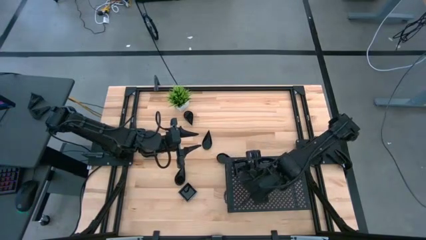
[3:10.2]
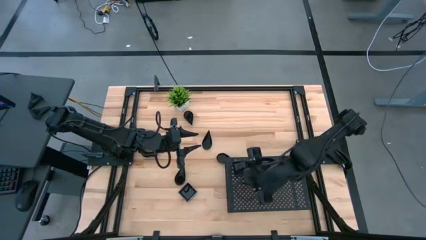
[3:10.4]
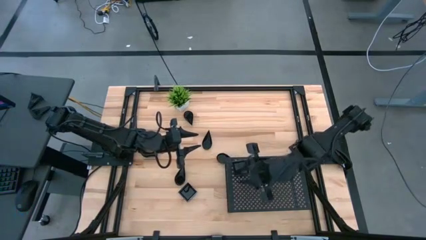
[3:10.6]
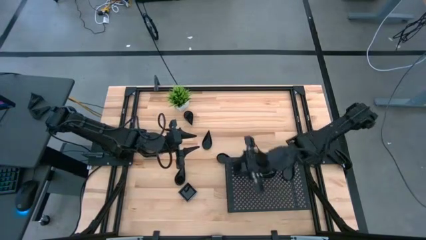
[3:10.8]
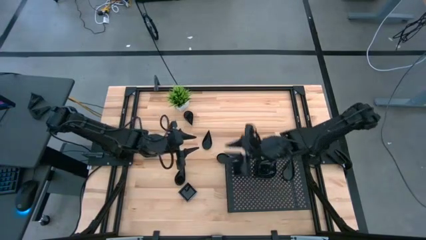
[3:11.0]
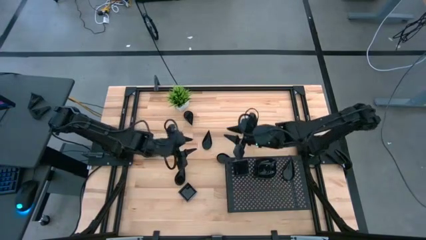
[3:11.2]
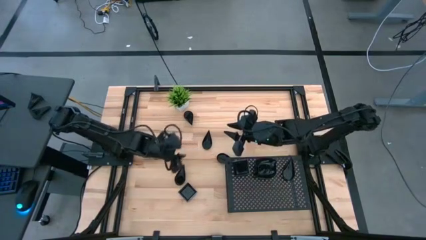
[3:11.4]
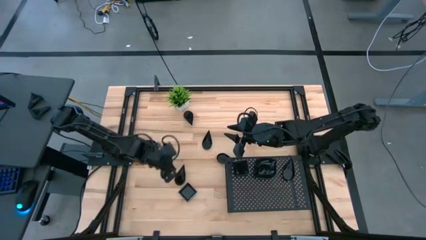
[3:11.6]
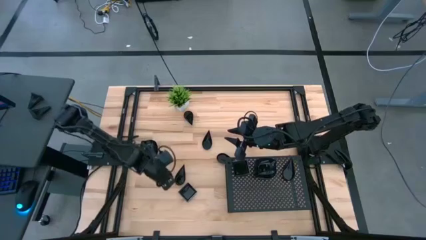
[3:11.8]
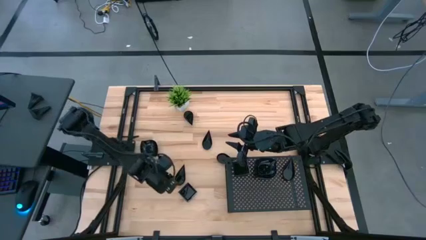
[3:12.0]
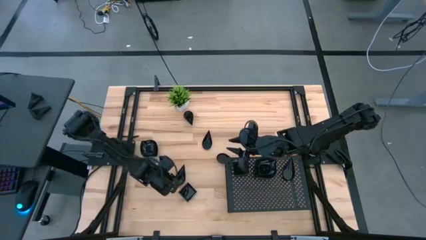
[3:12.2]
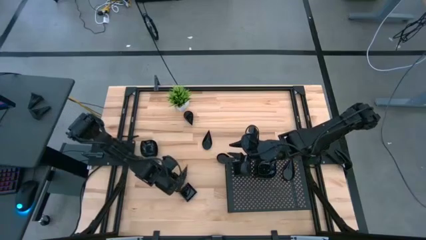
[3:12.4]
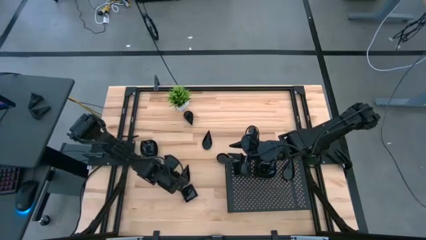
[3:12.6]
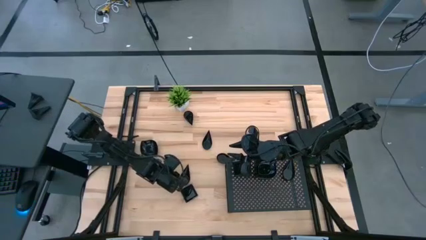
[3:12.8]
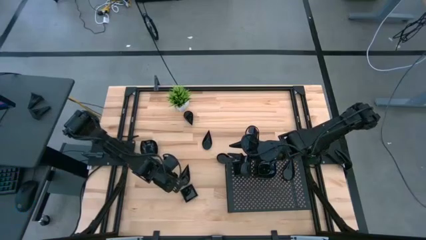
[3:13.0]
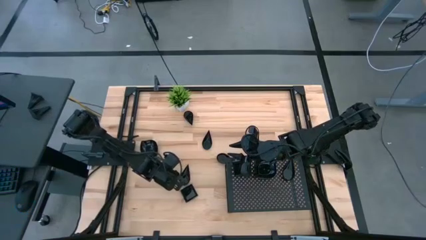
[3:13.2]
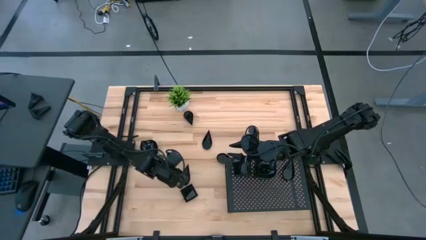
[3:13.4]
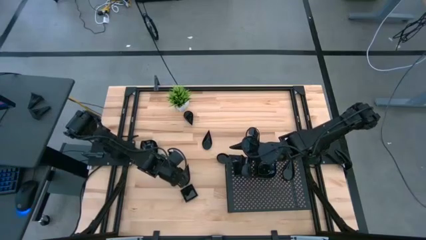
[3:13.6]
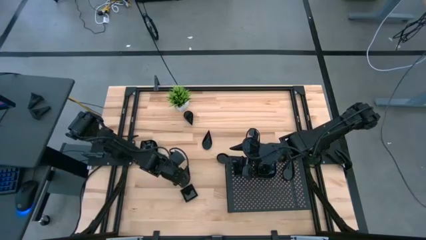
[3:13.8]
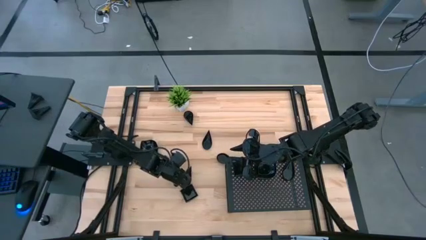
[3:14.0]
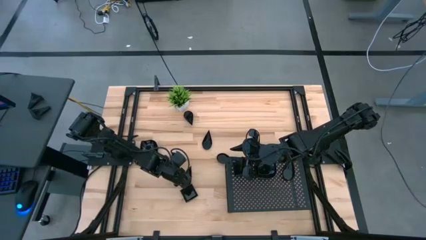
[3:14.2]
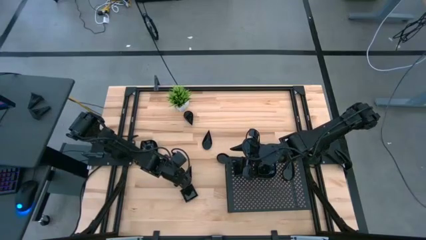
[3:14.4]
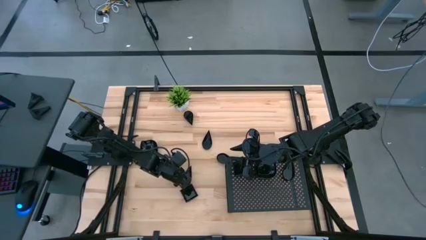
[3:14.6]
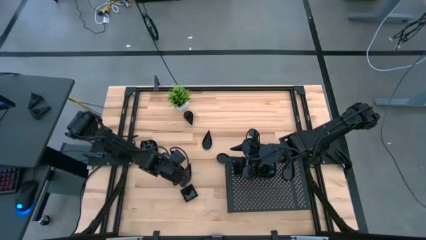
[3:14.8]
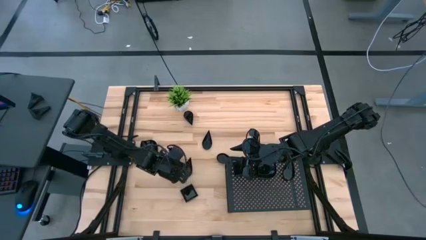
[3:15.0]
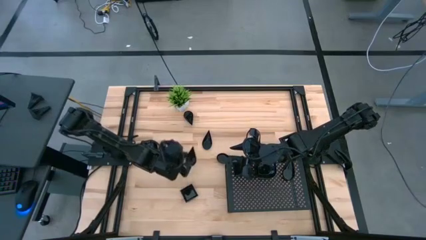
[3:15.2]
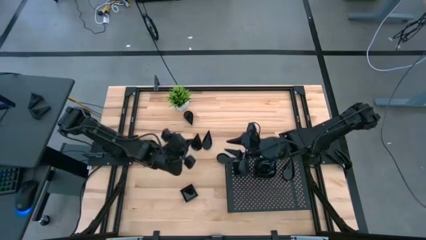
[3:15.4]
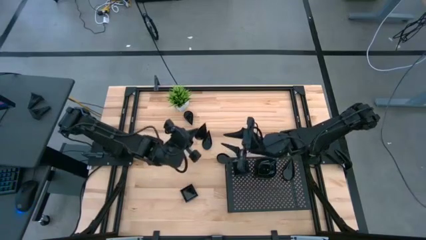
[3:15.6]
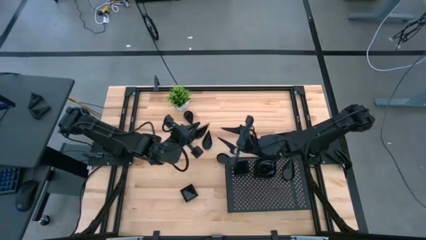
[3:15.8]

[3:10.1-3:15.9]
Task: Pick & Place Mini shaped plates
Stack the drop shaped plate on top of the drop shaped plate on the shelf

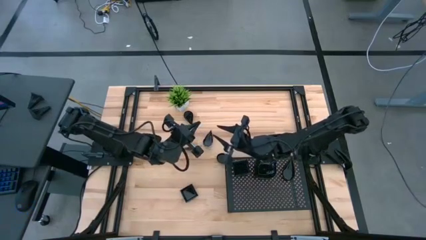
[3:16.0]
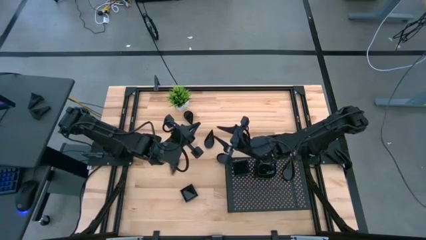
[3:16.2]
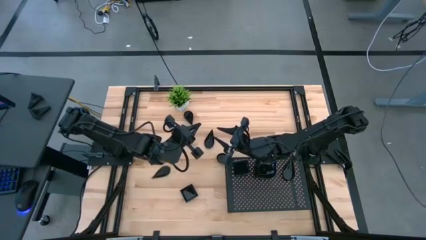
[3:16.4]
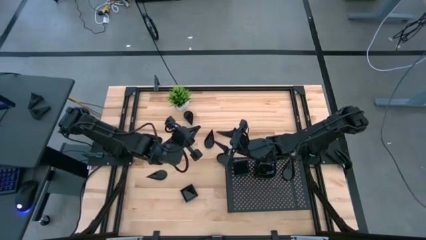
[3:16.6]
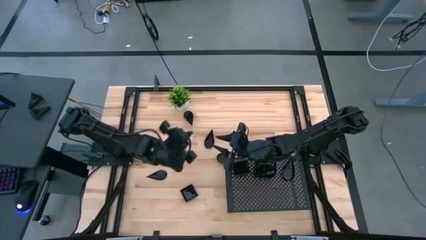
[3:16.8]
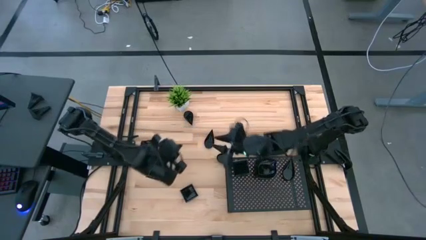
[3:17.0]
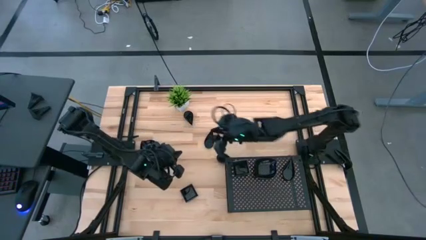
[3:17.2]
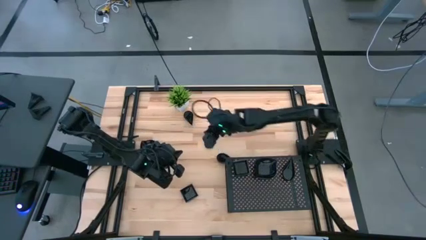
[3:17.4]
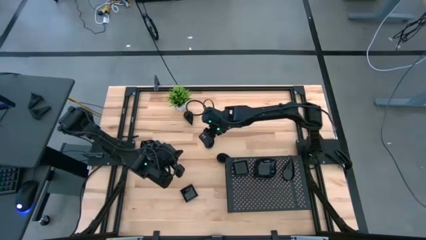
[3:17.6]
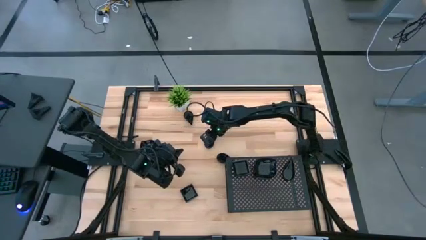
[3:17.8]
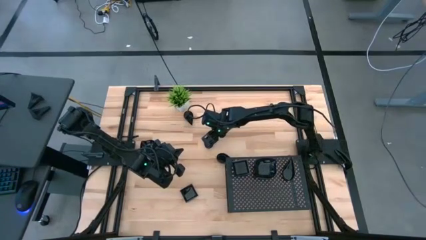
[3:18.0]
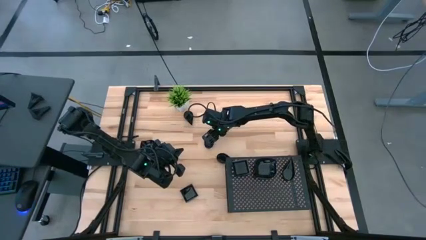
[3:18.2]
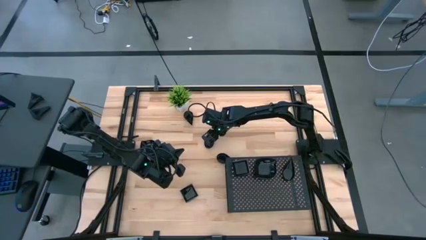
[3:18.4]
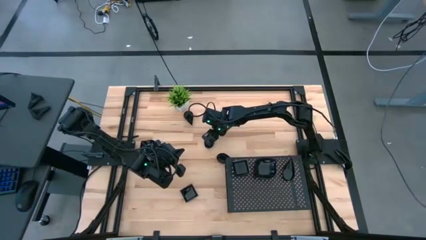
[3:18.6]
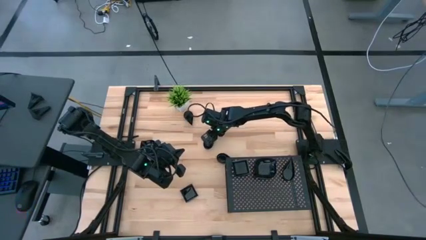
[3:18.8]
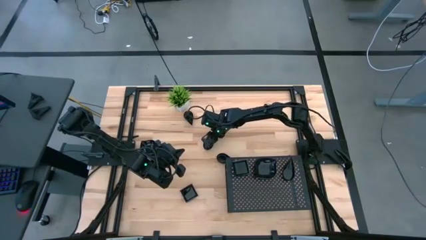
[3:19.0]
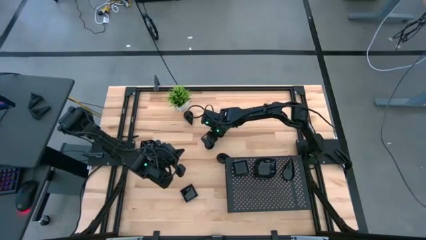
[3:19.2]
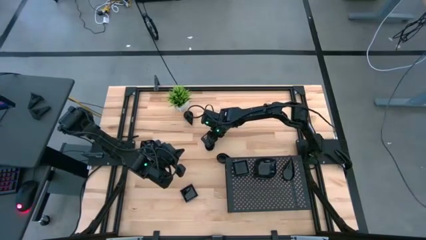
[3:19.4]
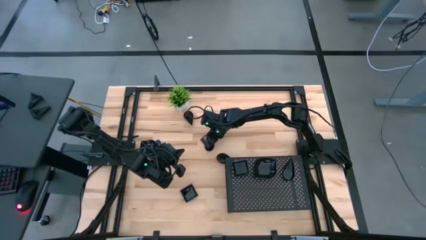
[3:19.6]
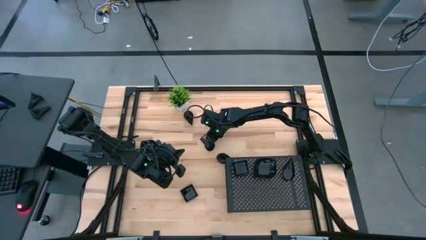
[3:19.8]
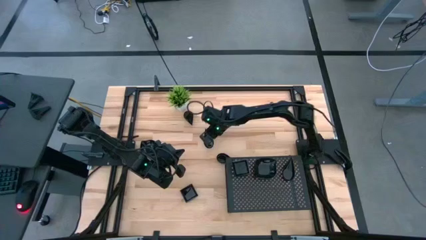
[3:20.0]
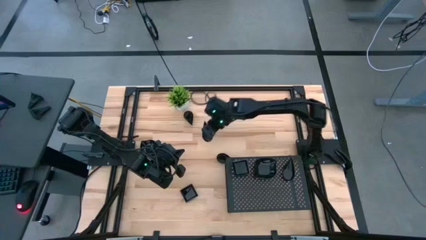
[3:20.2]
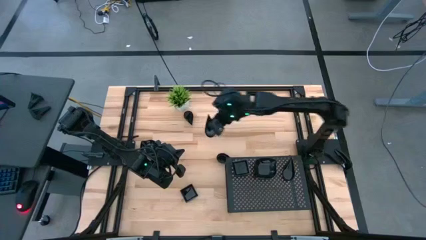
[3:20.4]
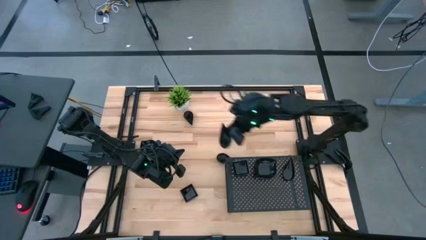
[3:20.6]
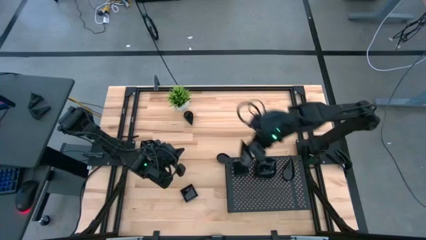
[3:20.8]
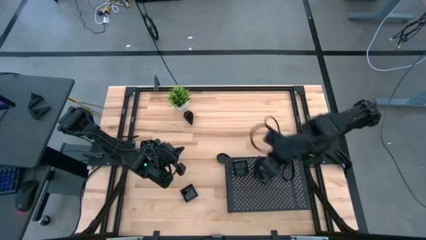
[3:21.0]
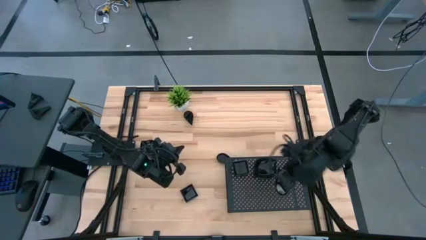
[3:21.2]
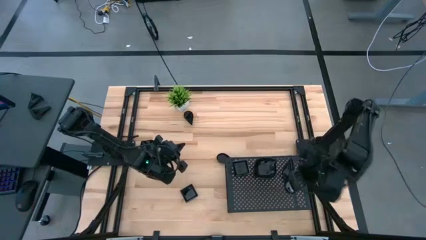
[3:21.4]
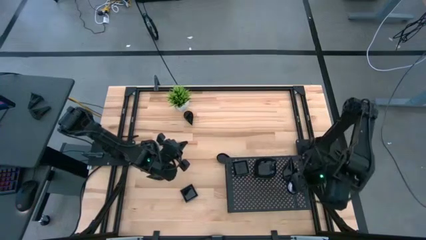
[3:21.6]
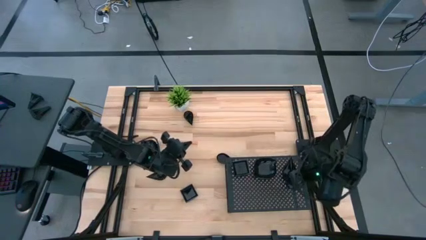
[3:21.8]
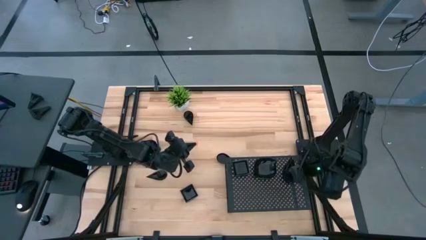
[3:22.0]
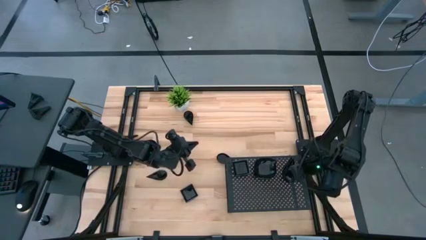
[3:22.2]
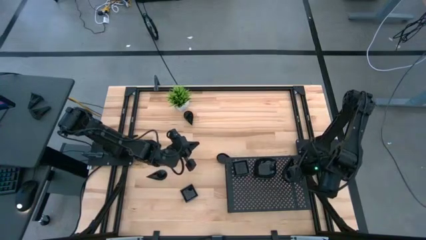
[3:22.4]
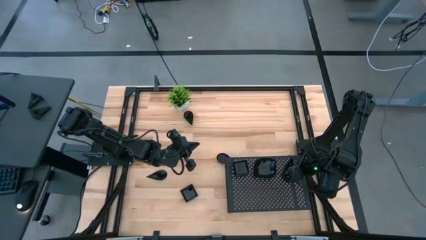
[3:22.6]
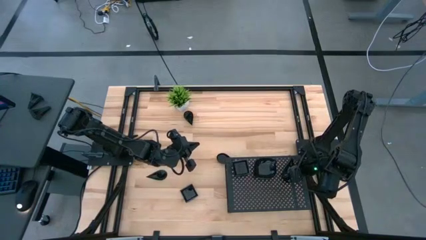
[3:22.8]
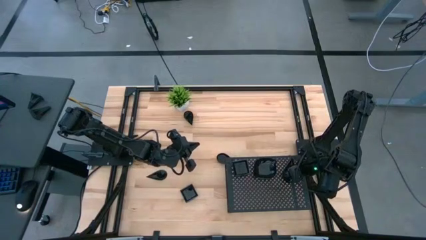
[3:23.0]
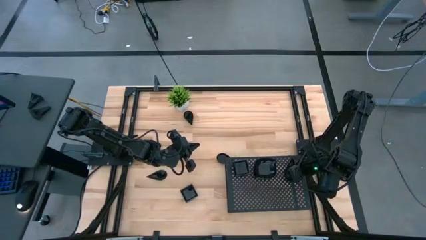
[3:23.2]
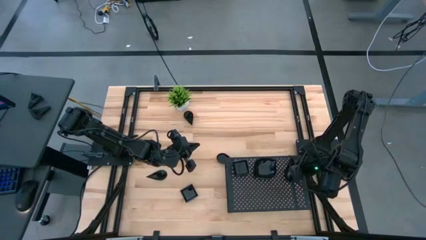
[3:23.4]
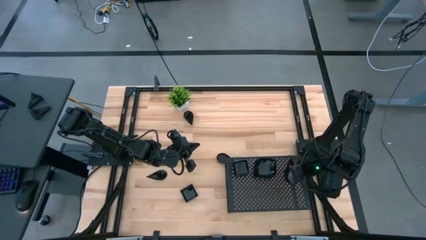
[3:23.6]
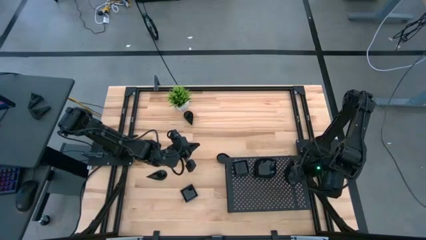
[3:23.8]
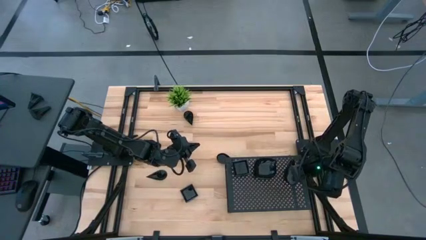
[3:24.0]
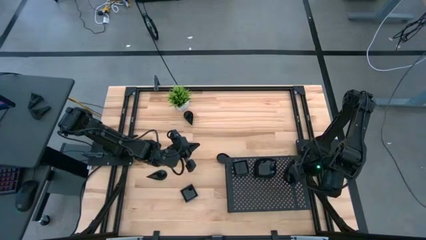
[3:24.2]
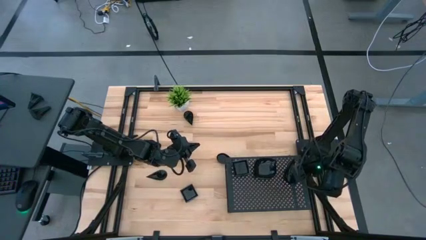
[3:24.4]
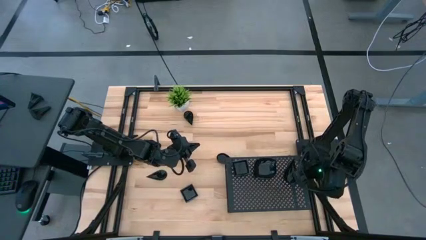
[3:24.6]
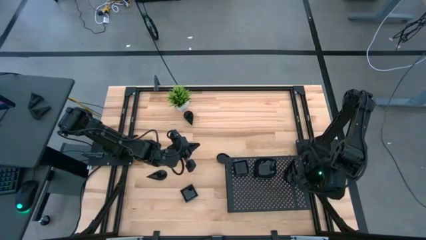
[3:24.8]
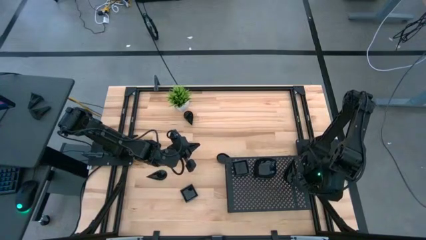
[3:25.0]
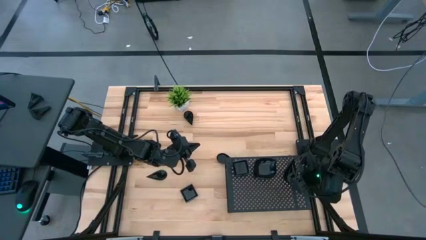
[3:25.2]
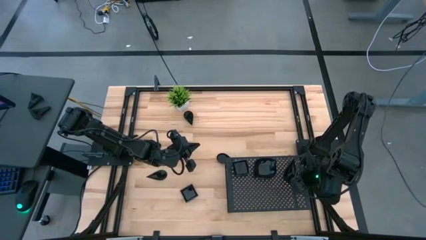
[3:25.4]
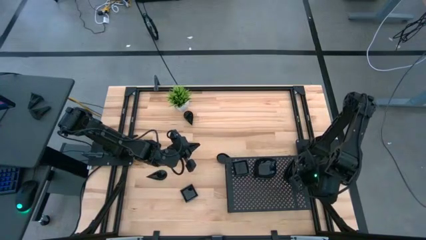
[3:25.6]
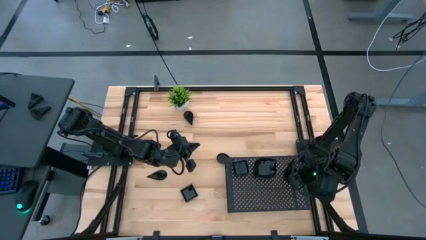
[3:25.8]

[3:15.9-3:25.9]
Stack the drop shaped plate on top of the drop shaped plate on the shelf

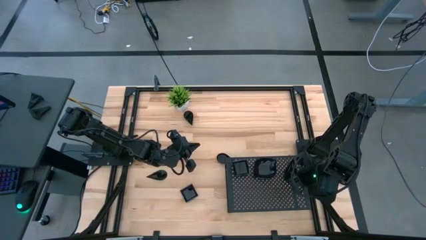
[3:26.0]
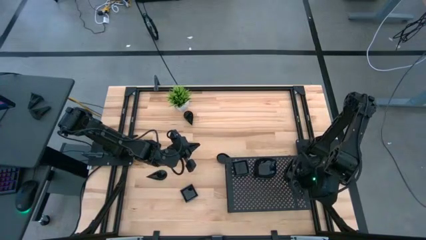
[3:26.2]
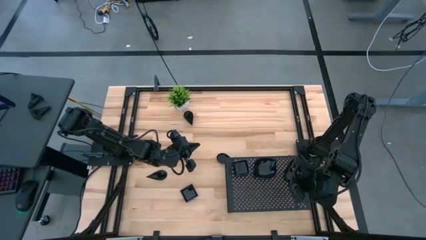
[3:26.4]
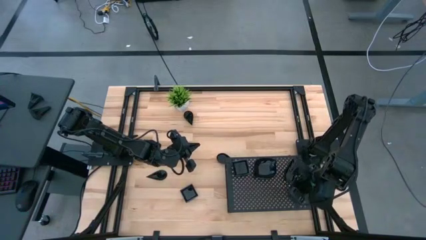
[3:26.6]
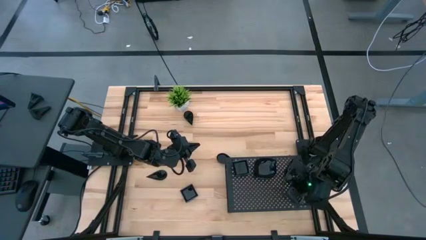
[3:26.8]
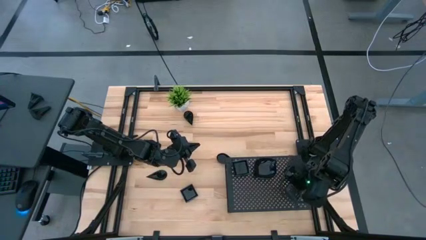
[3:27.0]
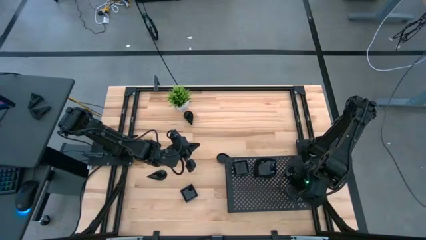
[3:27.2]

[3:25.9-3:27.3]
Adjust the stacked drop shaped plates on the shelf
